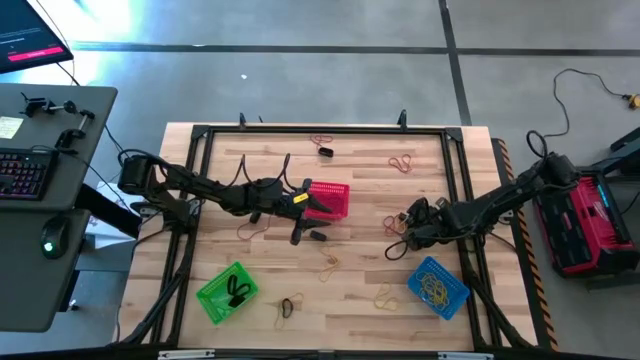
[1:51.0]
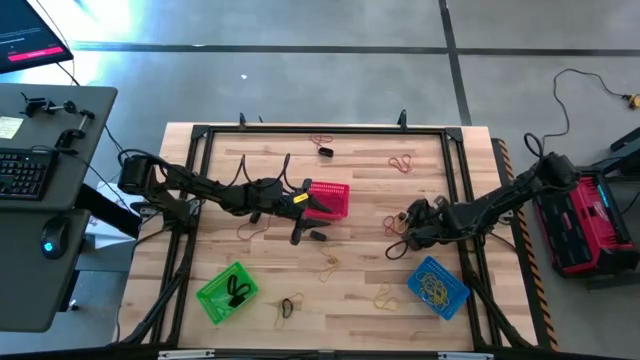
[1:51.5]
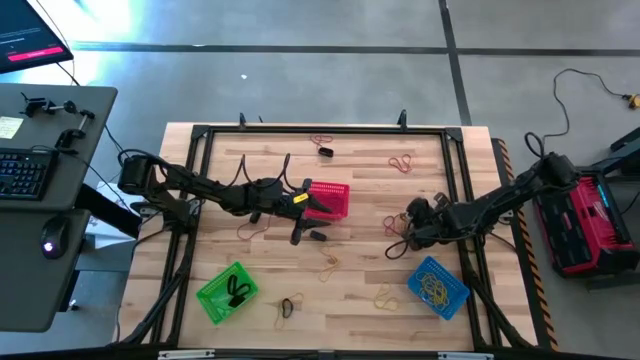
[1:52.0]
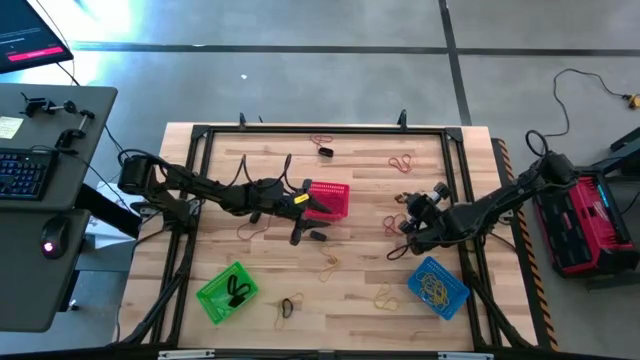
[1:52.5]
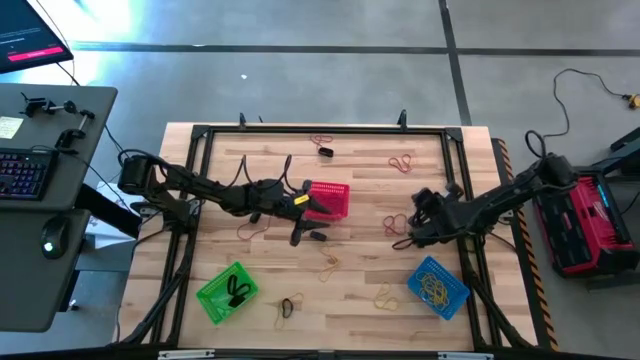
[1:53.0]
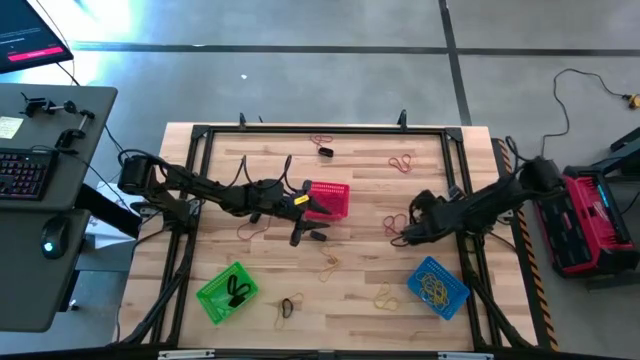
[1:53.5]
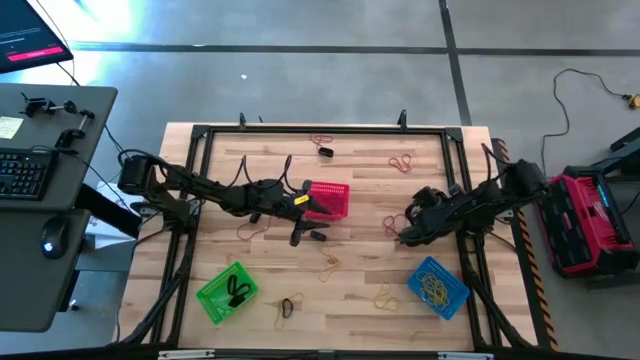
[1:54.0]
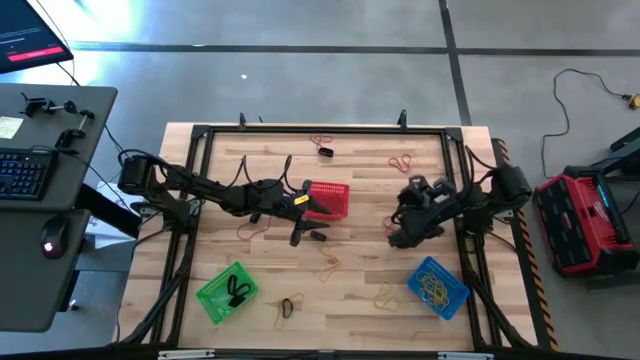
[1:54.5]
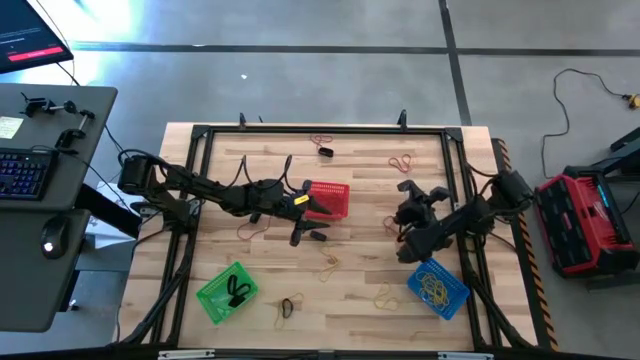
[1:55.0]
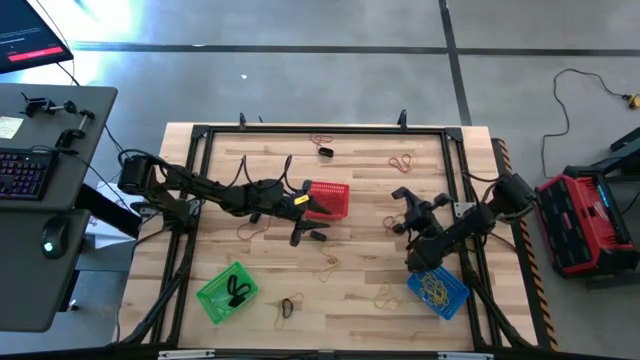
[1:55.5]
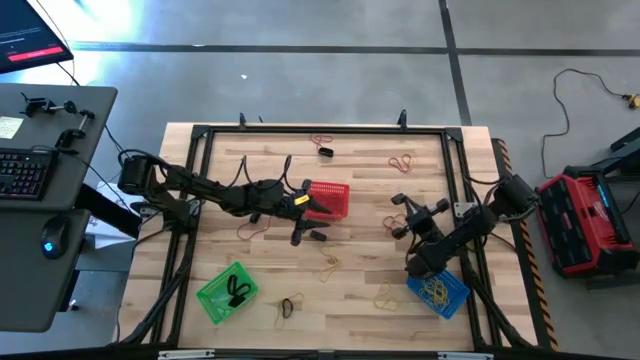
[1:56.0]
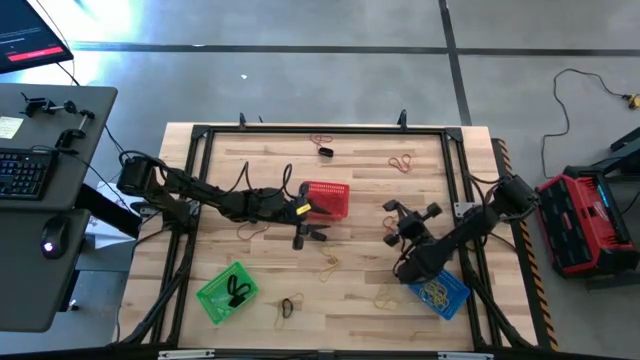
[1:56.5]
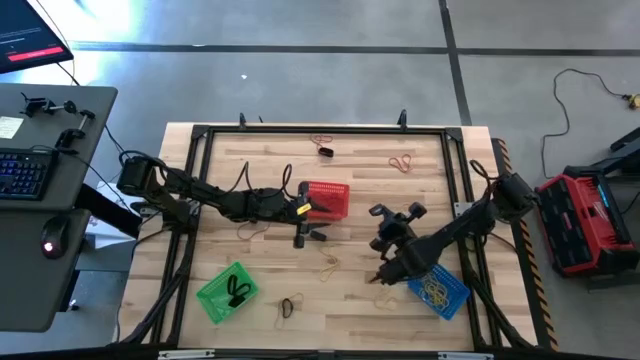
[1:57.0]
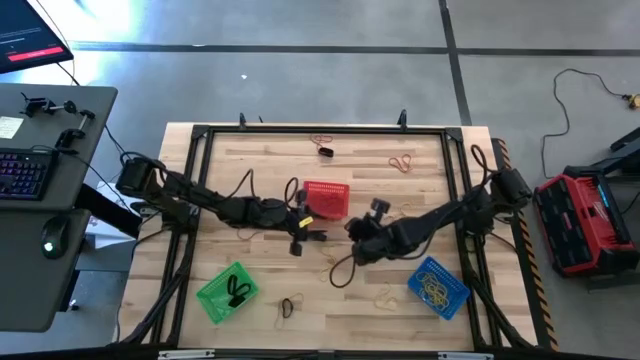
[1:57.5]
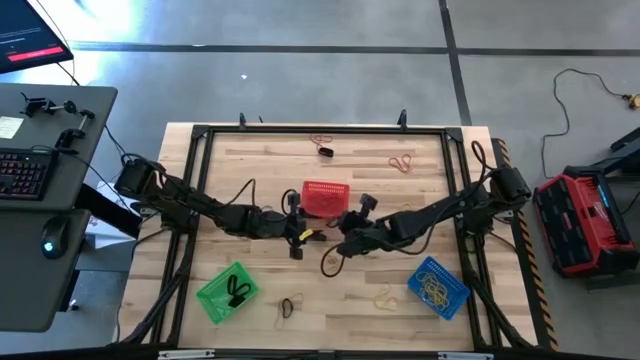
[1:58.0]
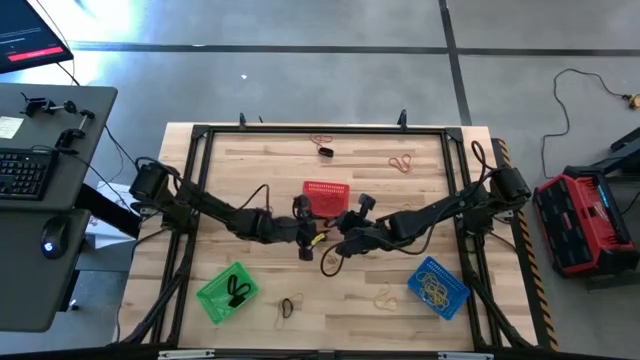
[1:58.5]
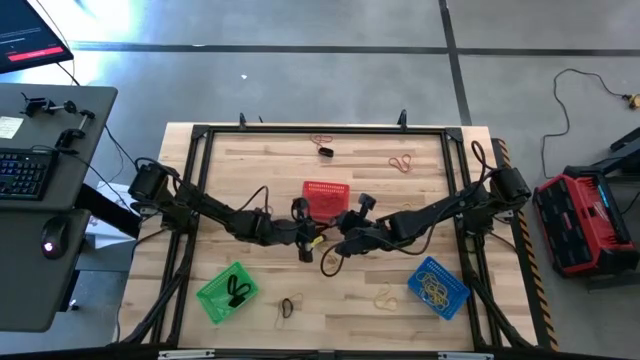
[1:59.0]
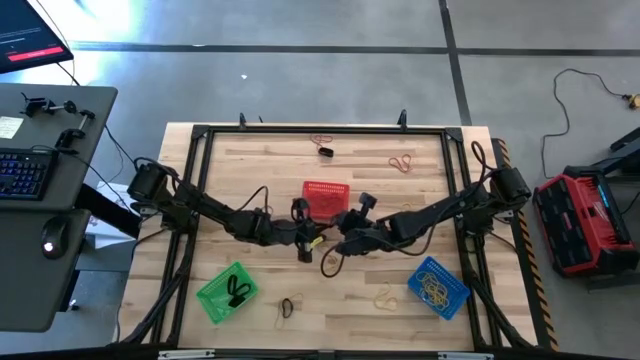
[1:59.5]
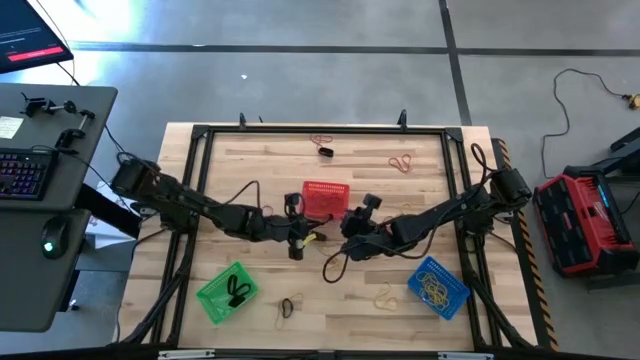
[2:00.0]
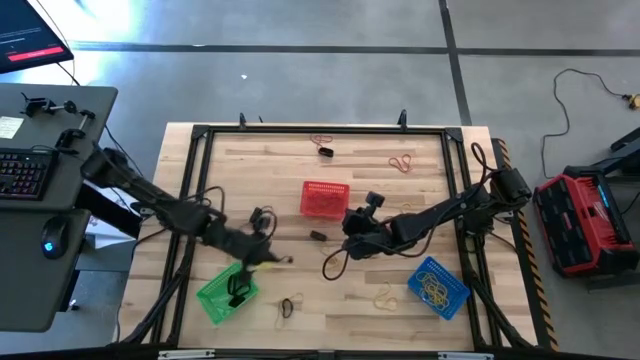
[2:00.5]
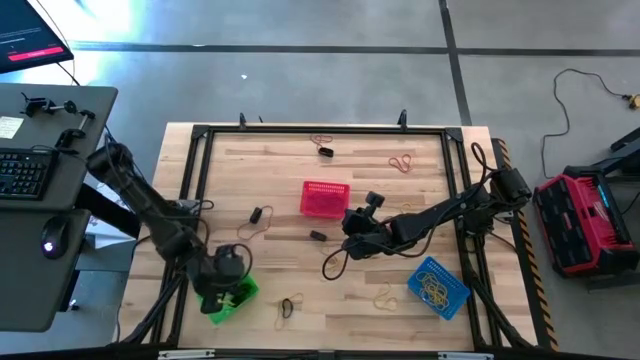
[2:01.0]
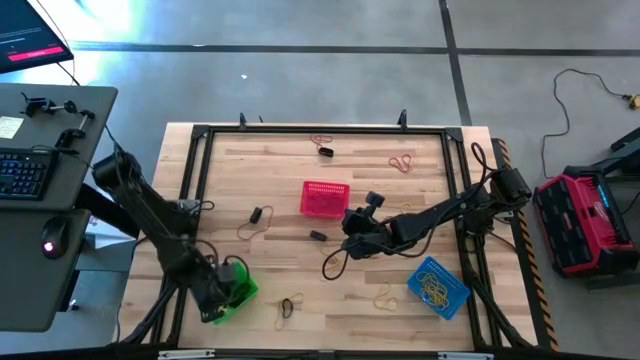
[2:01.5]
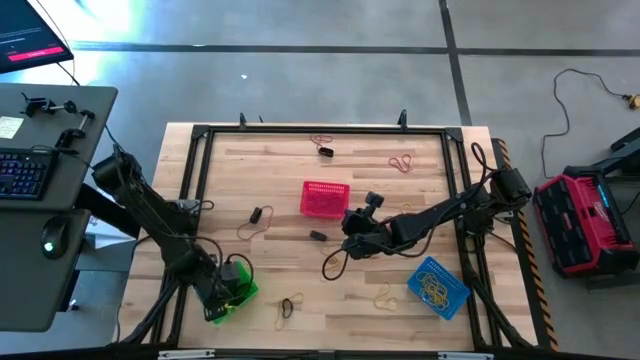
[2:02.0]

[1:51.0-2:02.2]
Task: Sort rubber bands into baskets
Put the black rubber band into the green bin

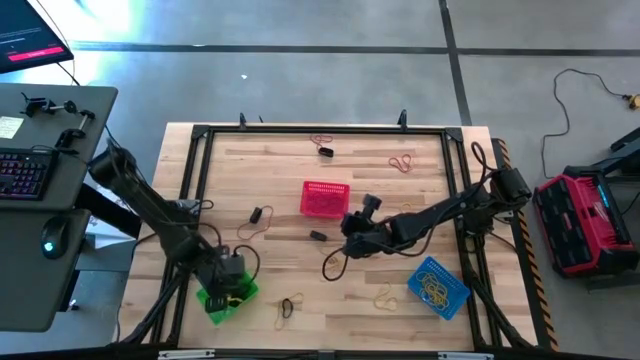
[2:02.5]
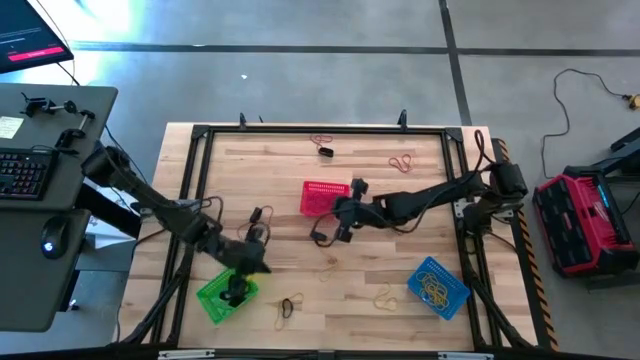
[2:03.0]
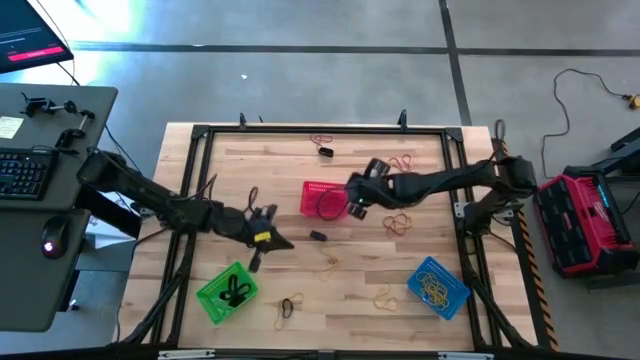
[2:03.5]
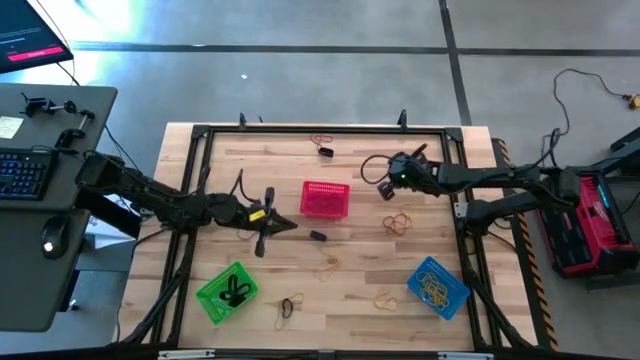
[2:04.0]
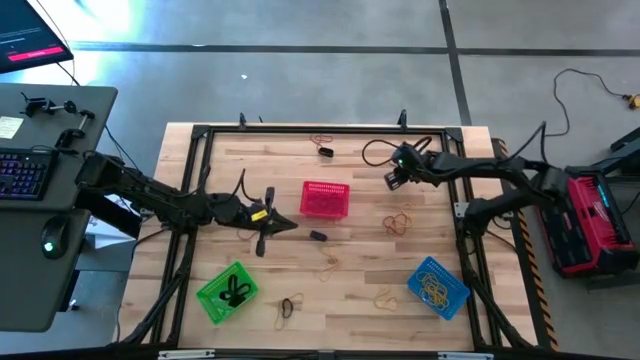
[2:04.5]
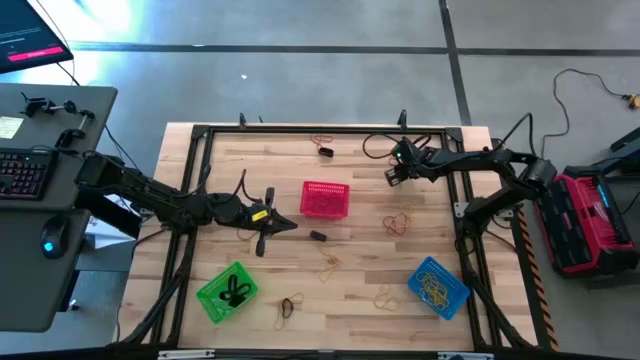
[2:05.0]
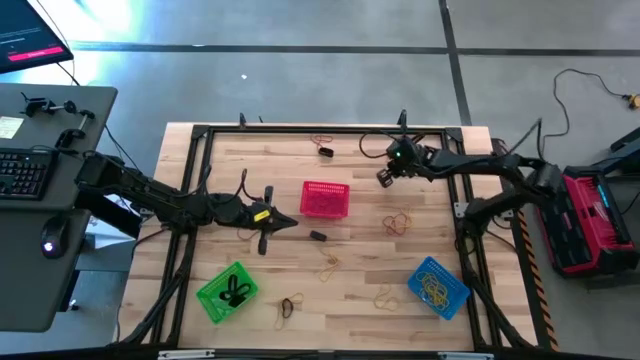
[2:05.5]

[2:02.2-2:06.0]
Put the red rubber band into the red bin

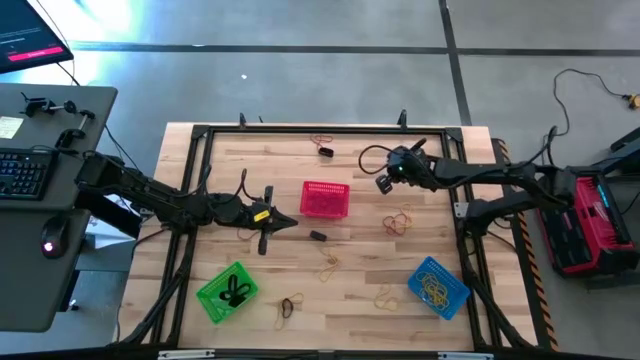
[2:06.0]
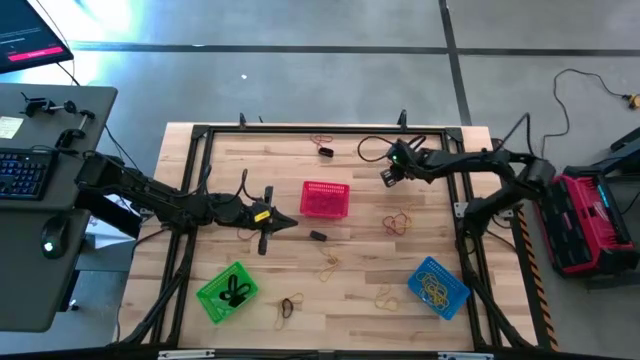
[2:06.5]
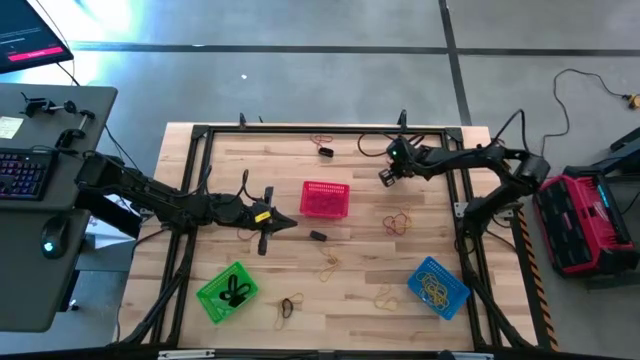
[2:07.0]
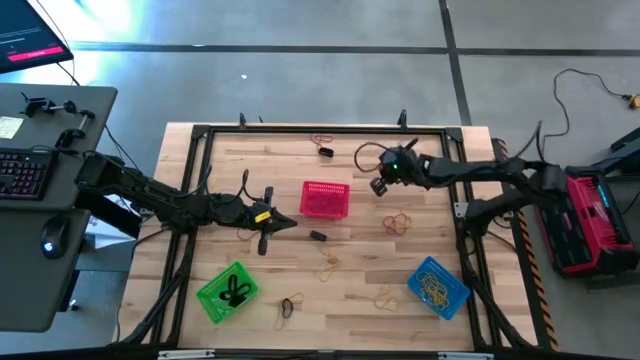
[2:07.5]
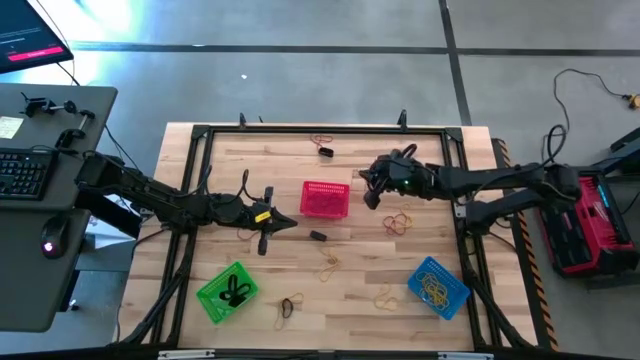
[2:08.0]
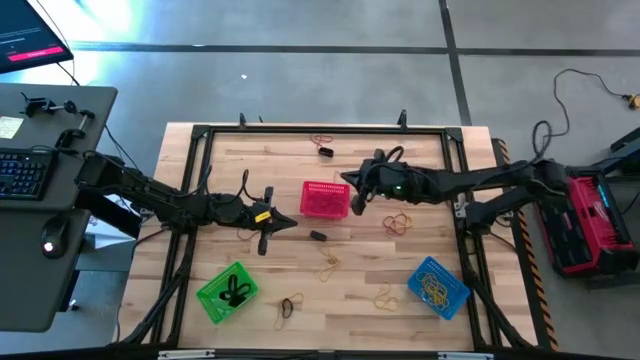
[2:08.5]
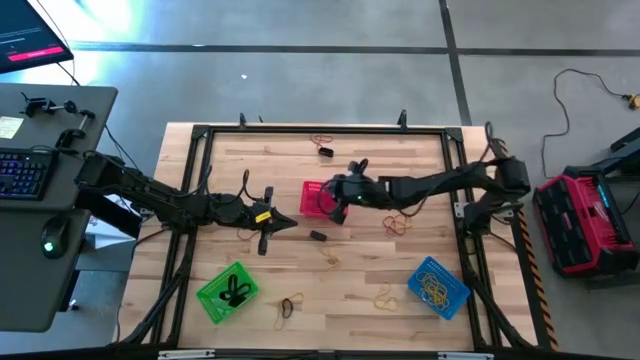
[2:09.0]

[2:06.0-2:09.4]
Put the red rubber band into the red bin

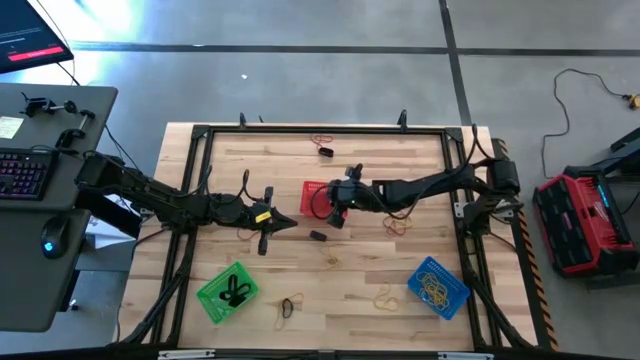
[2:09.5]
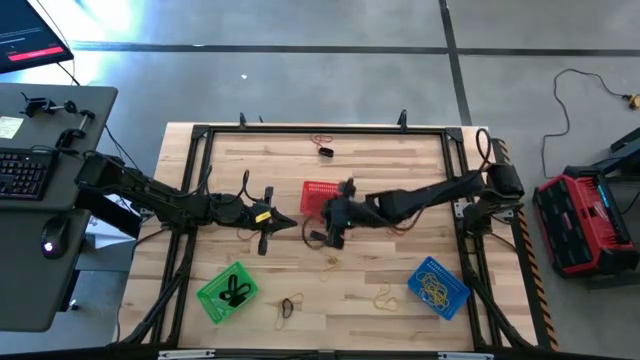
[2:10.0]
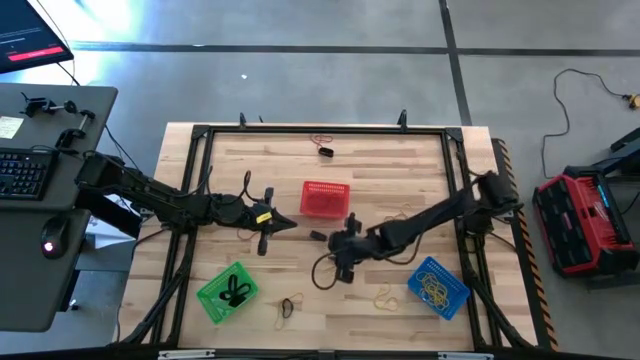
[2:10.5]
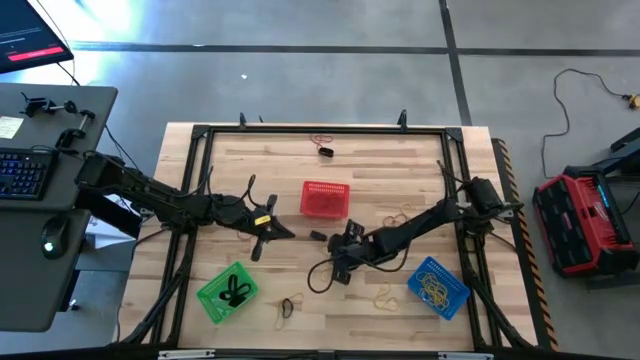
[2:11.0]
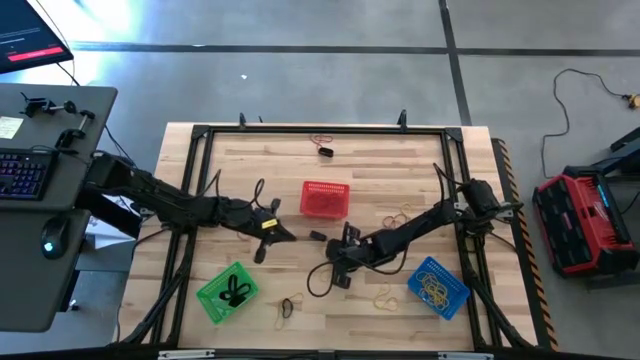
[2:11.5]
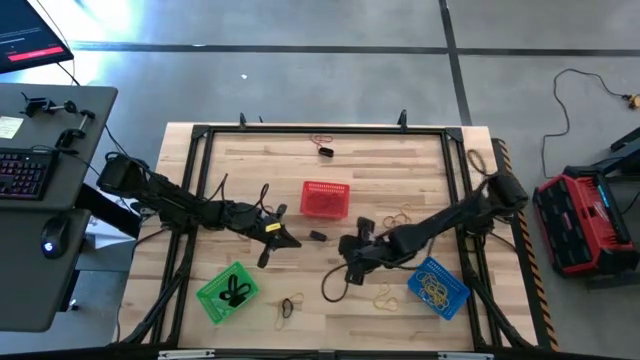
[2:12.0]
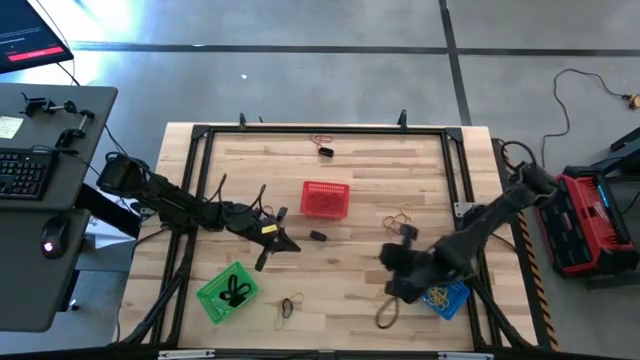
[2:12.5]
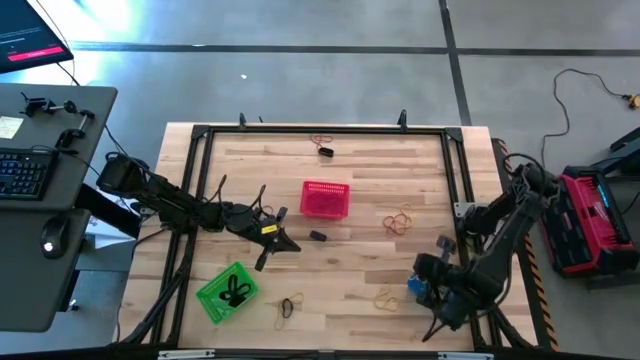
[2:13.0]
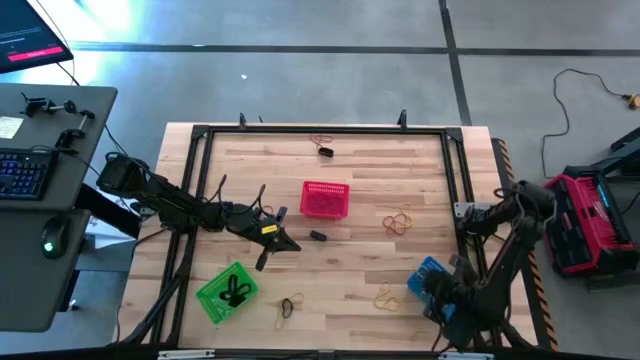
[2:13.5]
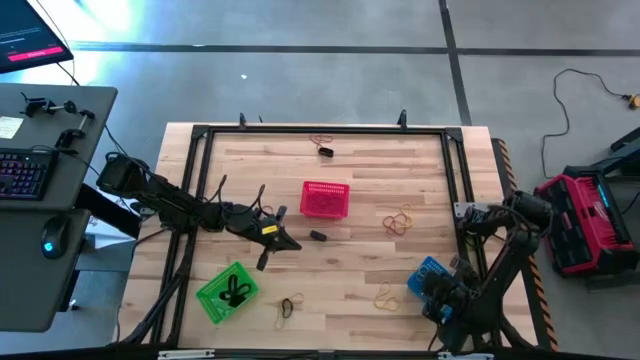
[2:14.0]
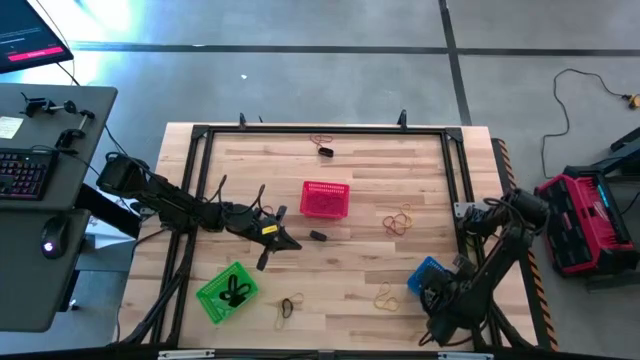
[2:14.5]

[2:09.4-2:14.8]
Put the yellow rubber band into the blue bin
